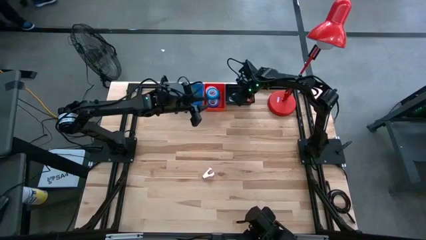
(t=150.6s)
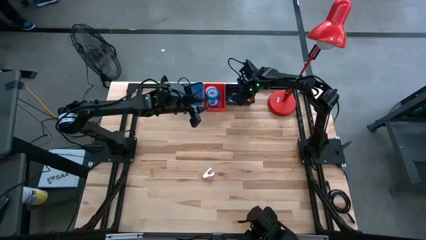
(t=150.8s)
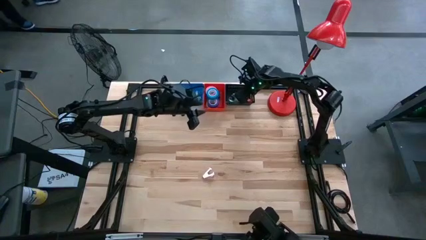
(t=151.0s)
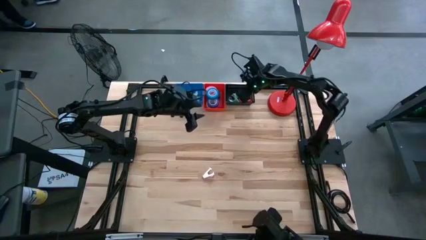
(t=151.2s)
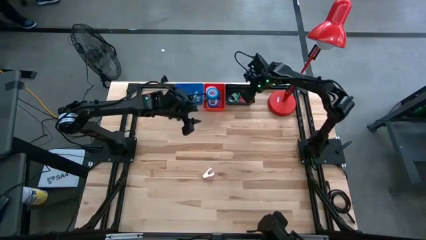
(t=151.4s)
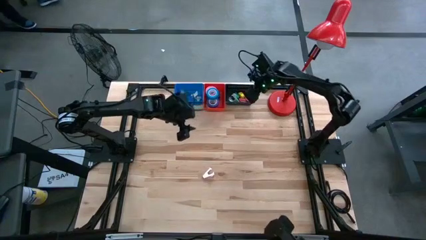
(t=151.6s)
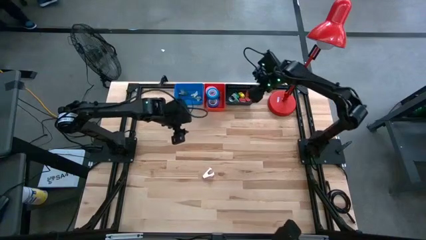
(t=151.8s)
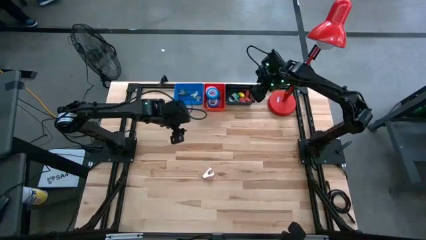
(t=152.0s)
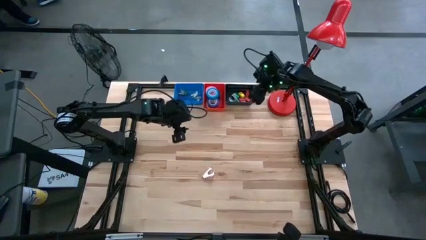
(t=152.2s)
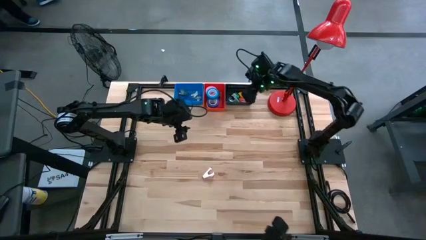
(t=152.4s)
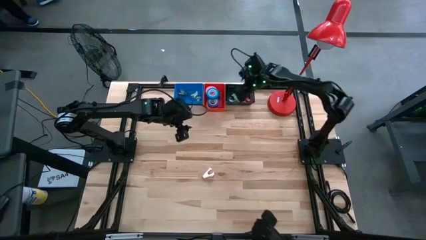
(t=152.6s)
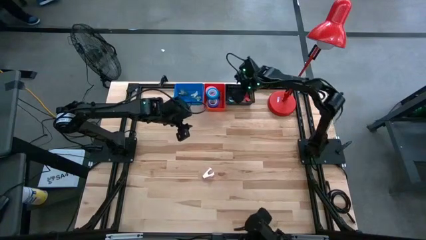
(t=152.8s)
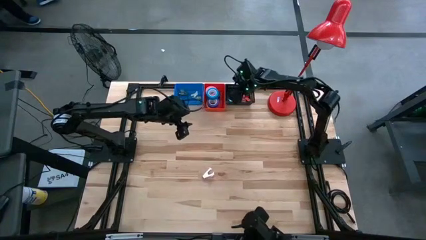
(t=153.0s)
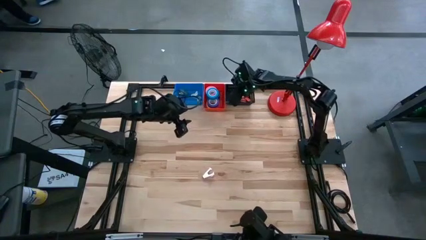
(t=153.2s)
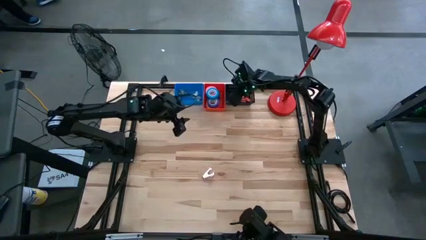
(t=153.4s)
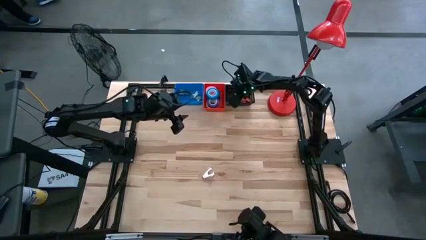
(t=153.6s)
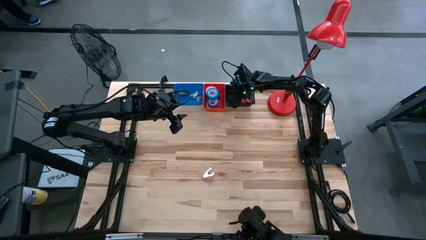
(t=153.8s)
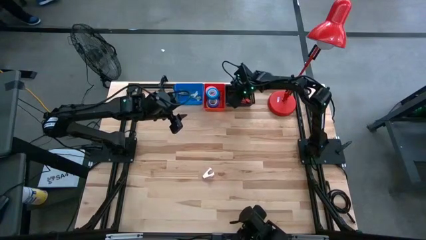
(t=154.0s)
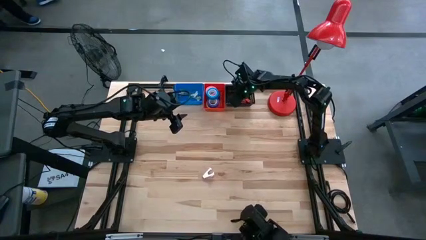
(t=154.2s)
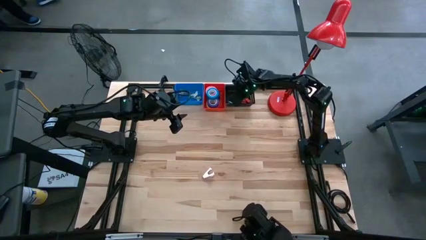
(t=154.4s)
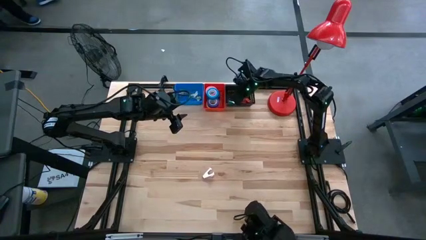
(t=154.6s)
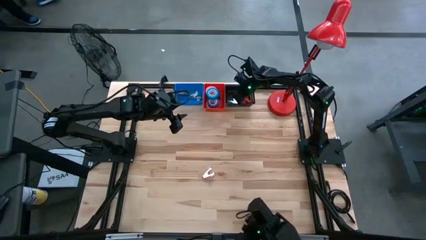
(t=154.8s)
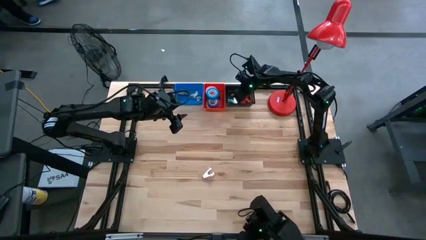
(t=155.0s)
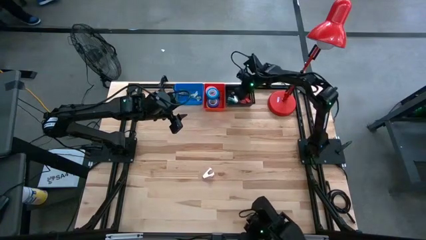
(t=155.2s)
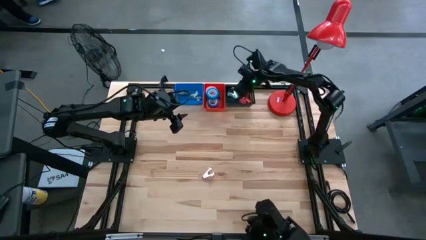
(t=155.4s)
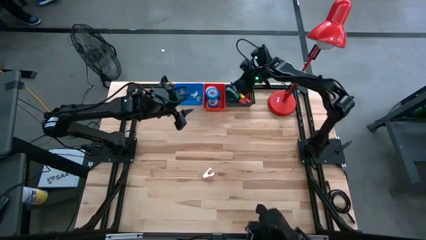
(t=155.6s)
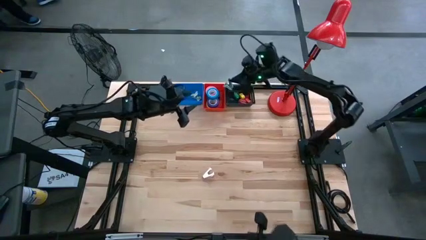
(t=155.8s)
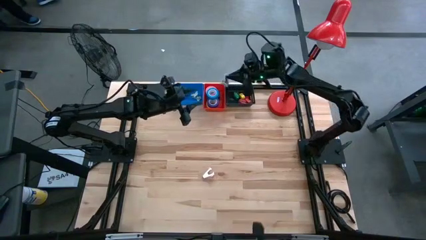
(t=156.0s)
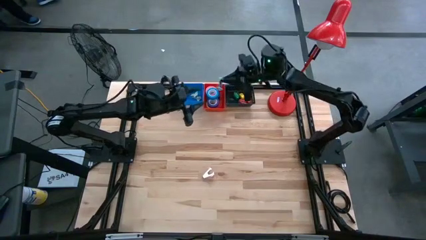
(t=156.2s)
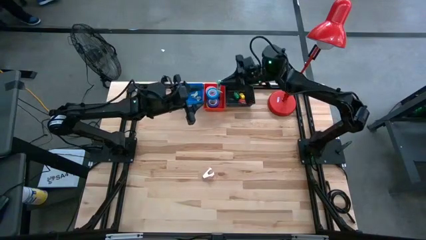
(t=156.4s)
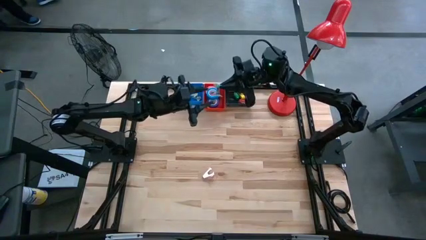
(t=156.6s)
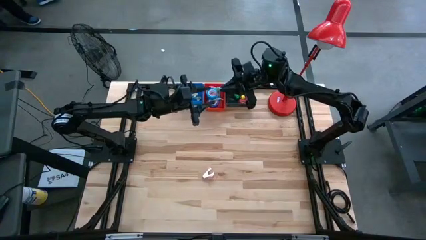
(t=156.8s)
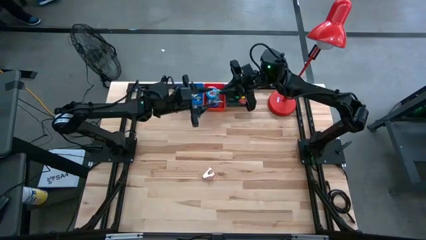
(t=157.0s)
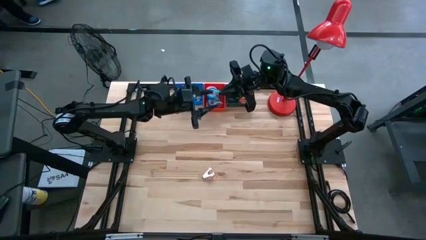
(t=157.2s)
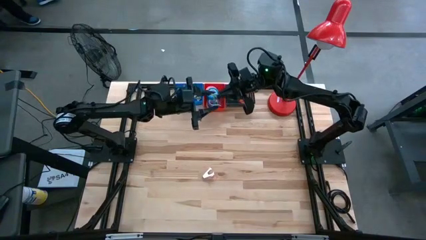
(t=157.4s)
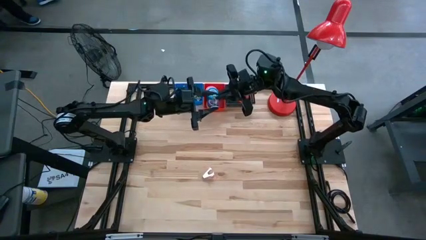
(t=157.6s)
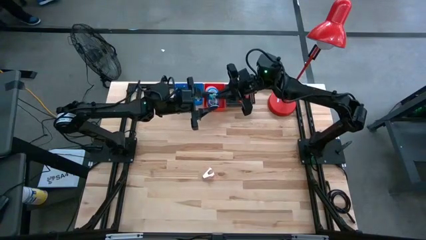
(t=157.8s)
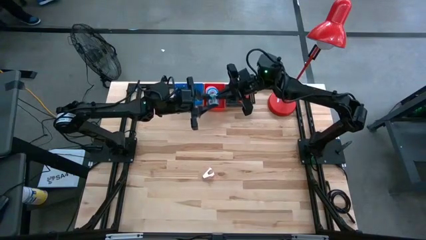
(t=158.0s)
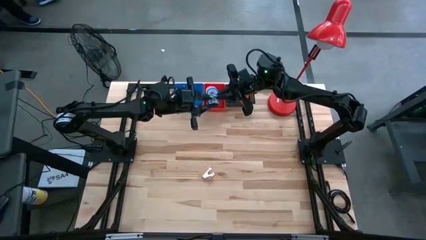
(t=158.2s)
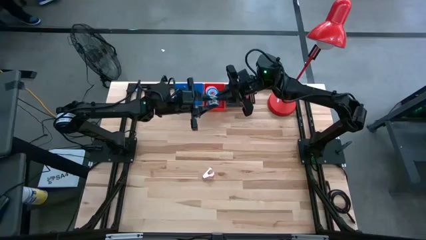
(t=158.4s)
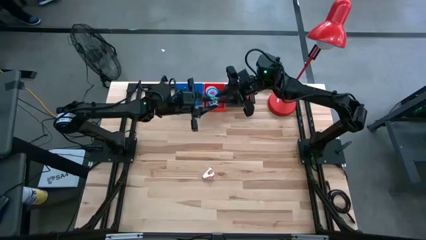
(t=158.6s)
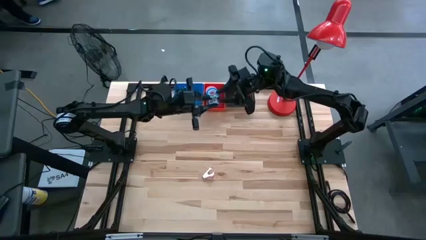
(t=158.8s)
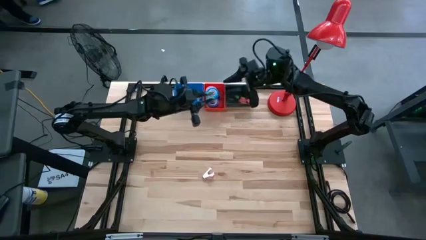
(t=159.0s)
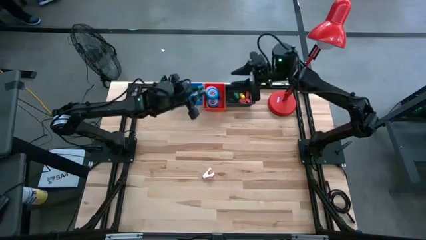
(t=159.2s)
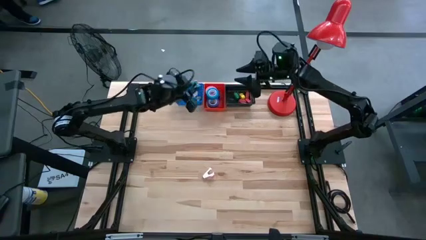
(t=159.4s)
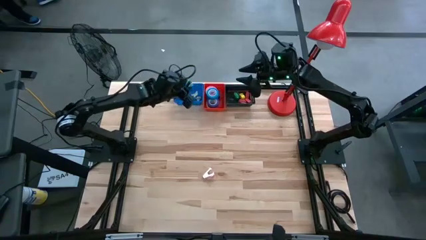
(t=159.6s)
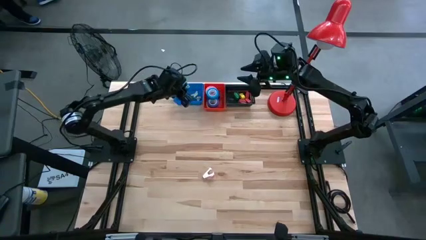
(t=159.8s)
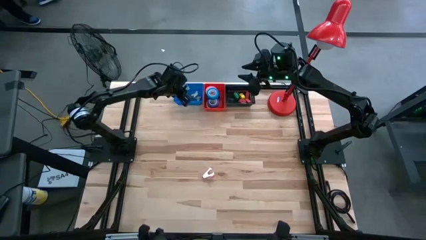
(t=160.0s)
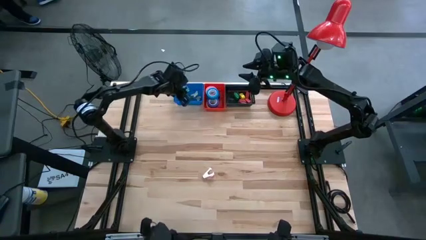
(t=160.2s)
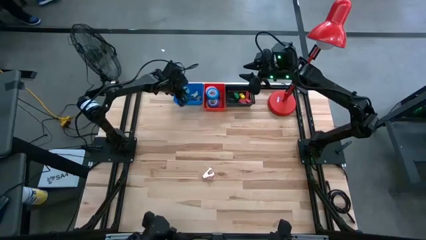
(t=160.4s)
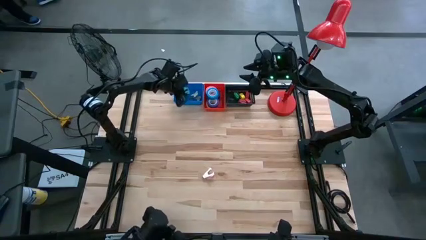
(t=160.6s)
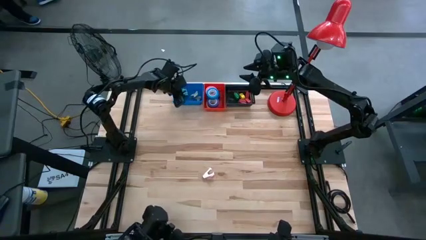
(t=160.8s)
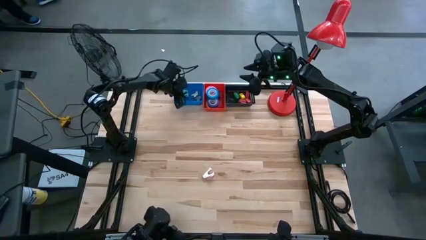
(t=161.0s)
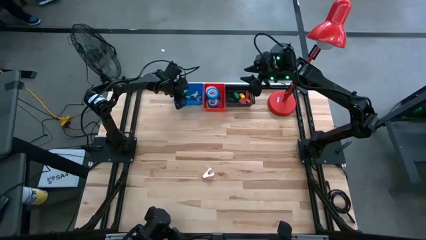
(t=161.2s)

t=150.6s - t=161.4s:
Task: Pick and place Stapler, Stapler remover, tape
Put the blue staple remover into the blue basket

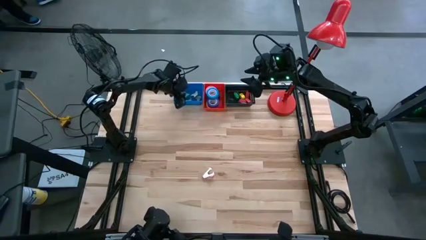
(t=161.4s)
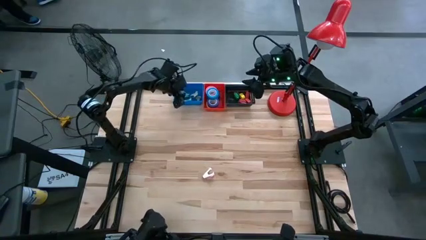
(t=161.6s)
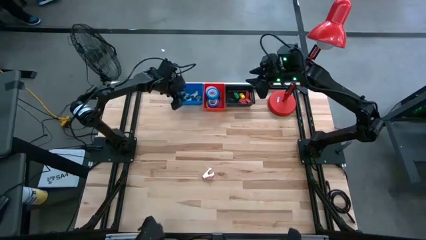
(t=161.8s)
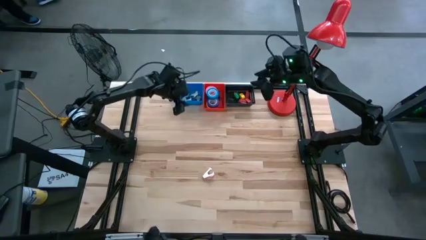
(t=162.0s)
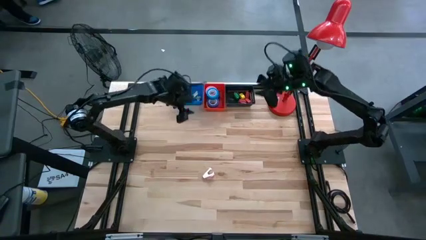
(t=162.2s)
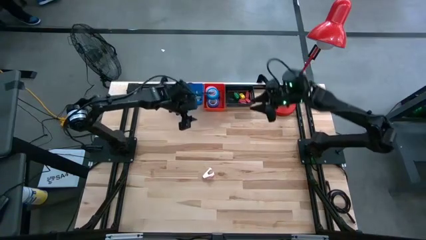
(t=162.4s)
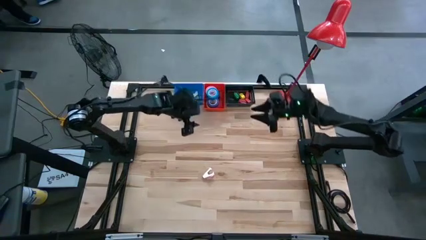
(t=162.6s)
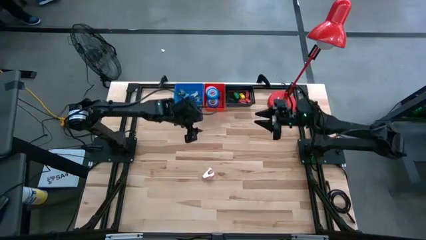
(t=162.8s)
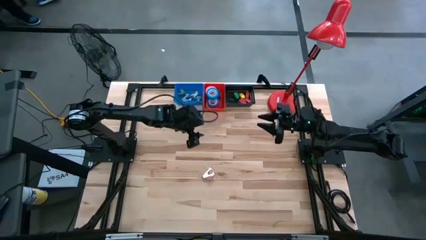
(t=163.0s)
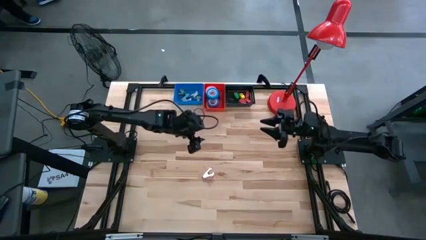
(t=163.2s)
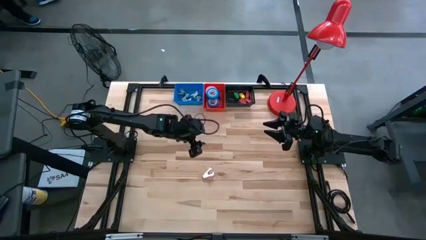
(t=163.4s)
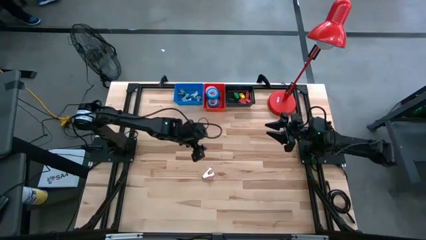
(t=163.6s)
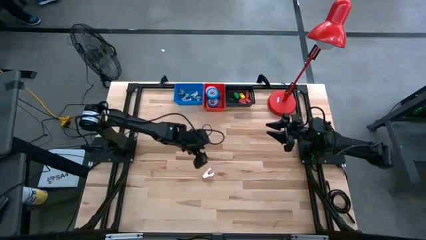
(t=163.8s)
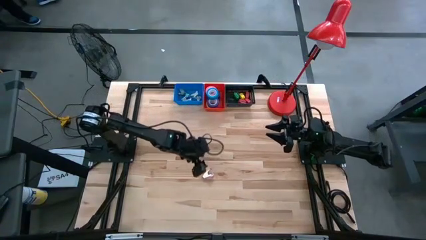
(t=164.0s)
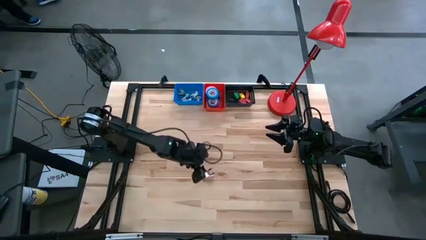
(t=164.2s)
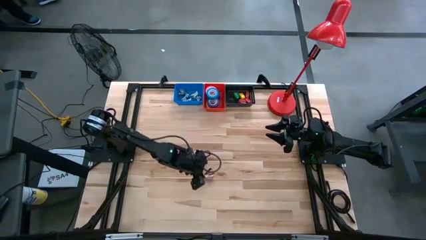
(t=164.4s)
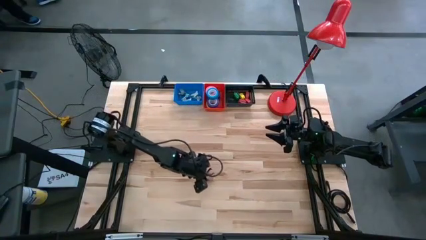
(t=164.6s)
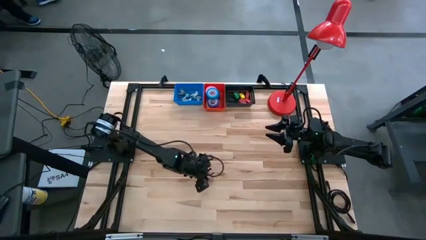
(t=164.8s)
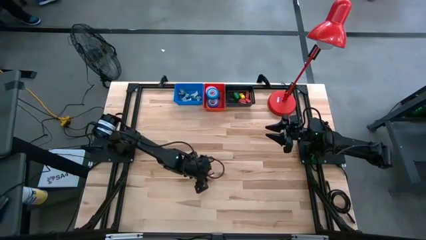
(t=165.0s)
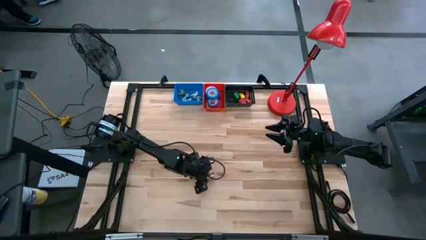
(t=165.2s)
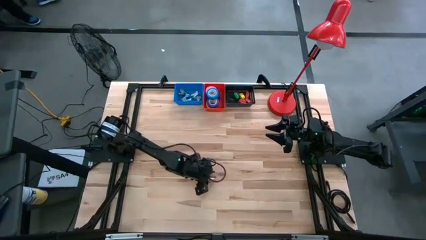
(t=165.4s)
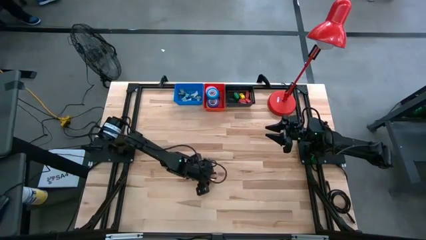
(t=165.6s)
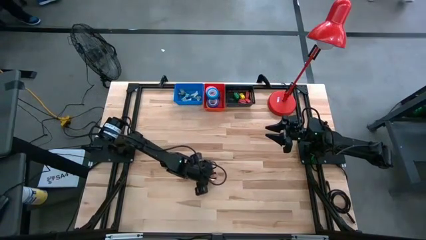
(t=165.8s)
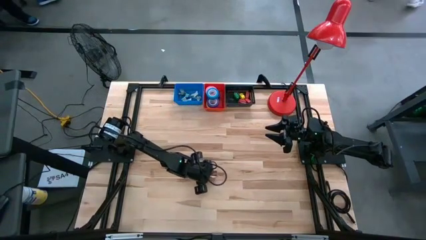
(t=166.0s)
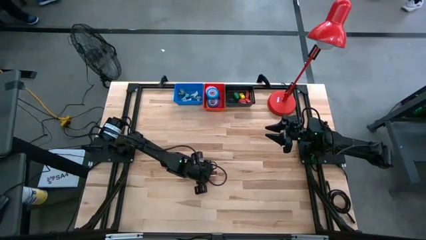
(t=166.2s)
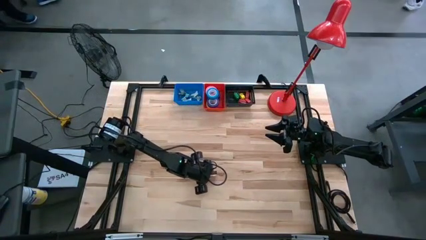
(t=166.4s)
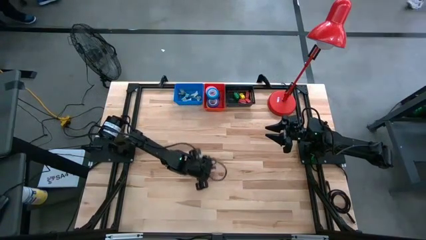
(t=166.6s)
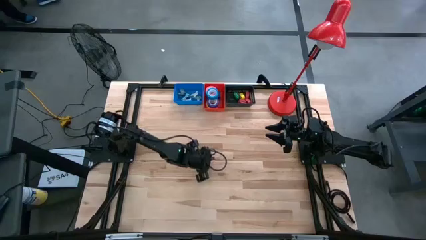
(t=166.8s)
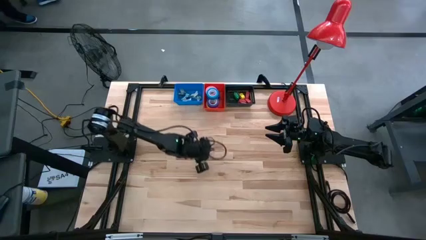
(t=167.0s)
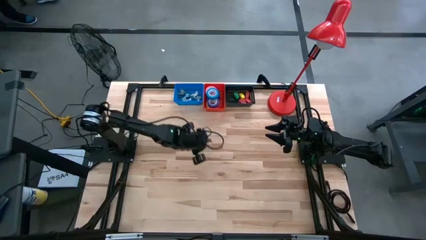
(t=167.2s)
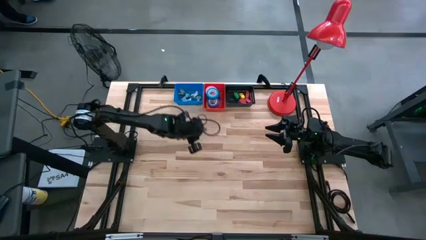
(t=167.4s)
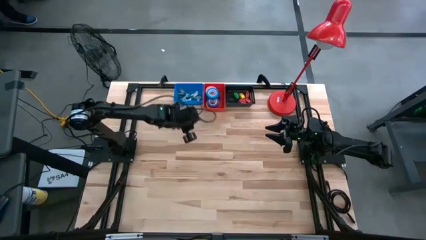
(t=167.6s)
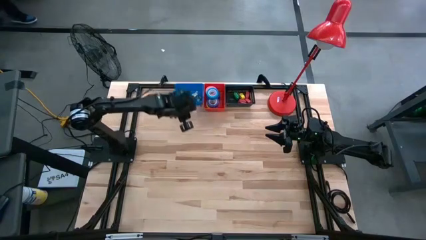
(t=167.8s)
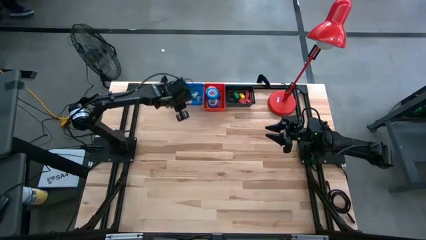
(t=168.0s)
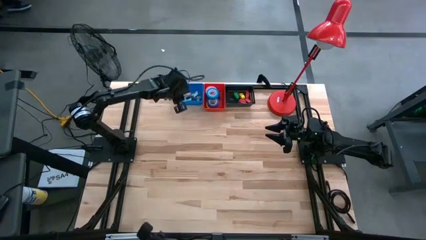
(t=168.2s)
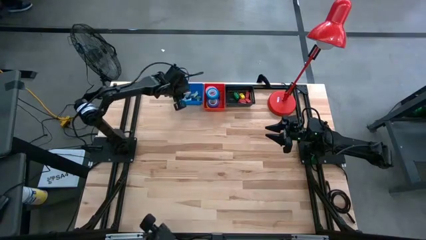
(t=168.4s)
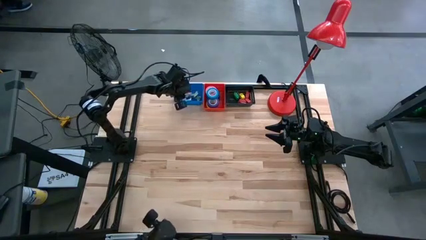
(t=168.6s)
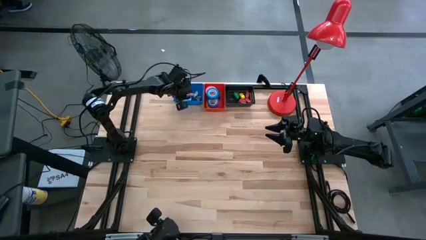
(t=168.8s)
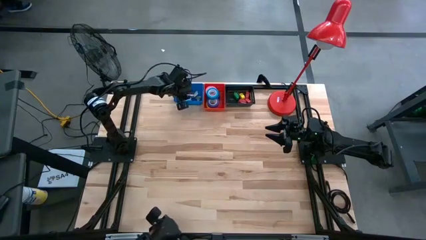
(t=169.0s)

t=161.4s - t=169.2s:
Put the pink staple remover into the blue basket
